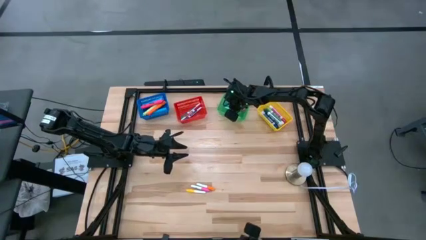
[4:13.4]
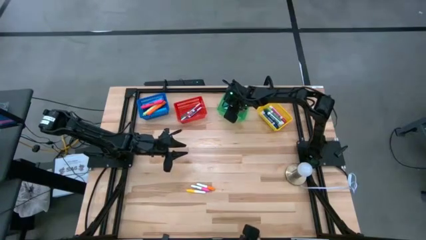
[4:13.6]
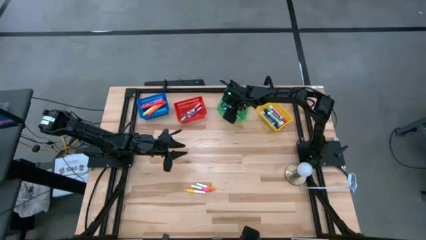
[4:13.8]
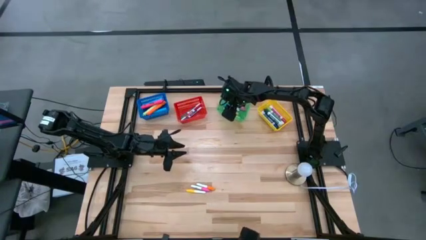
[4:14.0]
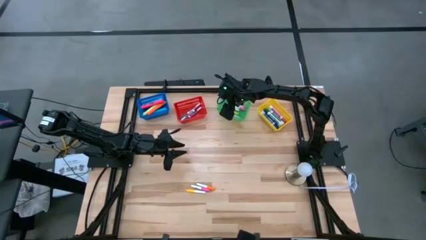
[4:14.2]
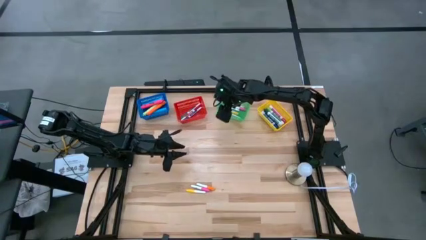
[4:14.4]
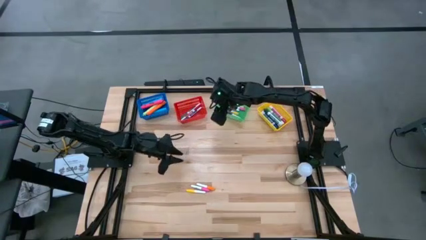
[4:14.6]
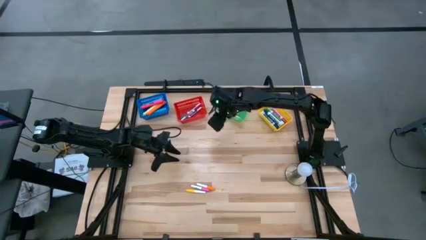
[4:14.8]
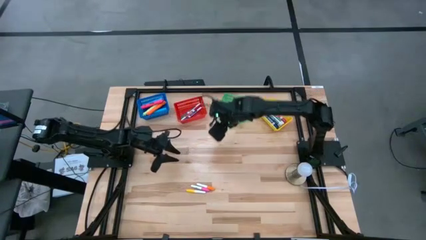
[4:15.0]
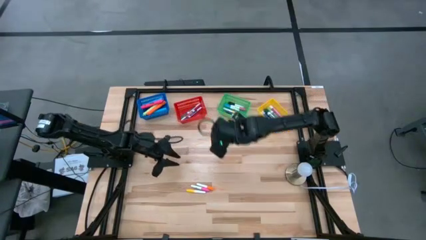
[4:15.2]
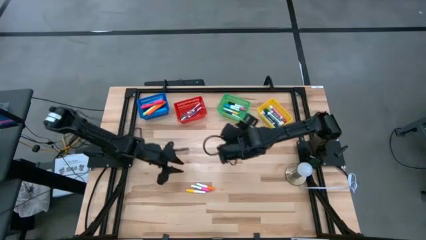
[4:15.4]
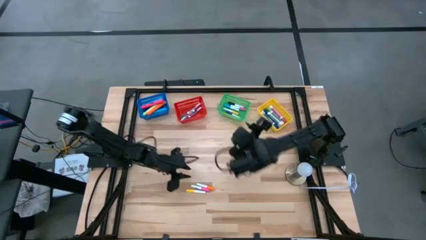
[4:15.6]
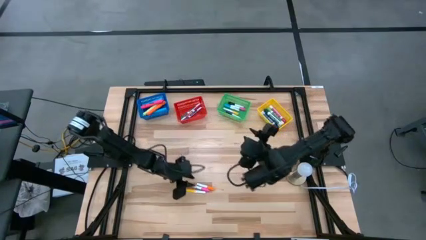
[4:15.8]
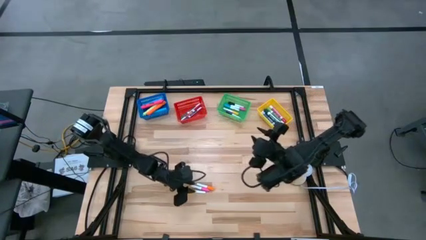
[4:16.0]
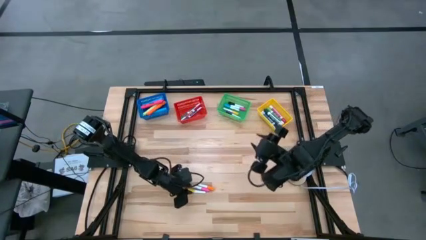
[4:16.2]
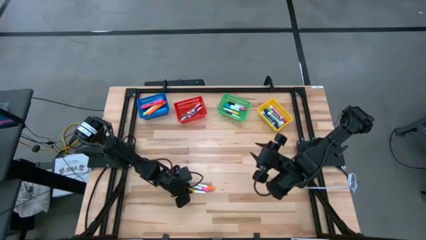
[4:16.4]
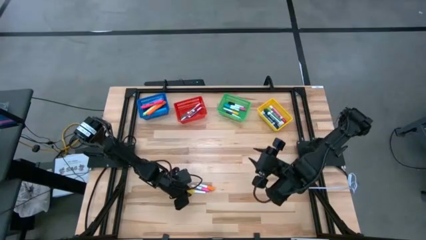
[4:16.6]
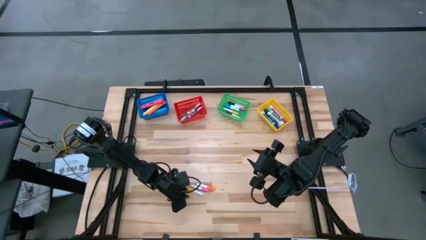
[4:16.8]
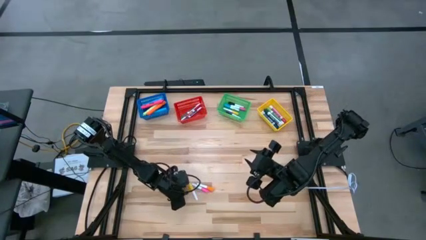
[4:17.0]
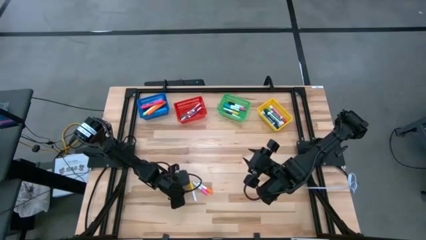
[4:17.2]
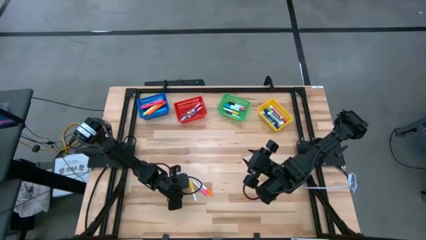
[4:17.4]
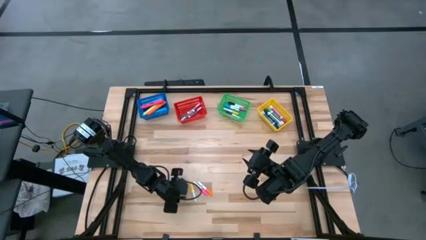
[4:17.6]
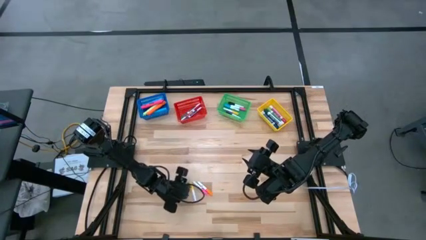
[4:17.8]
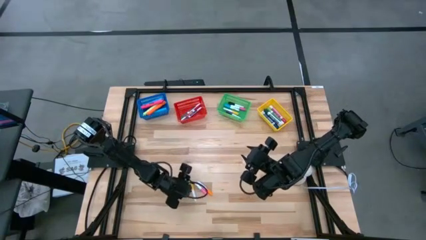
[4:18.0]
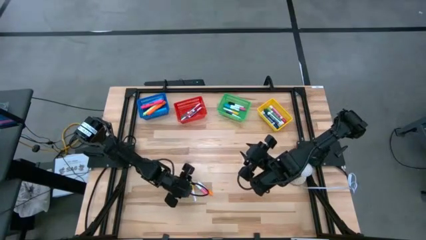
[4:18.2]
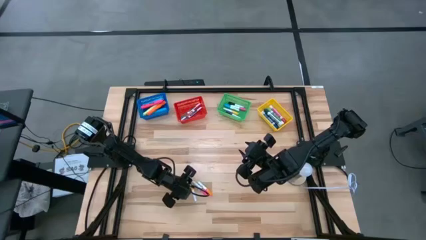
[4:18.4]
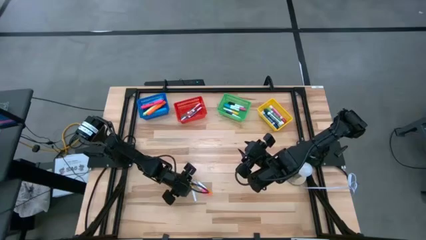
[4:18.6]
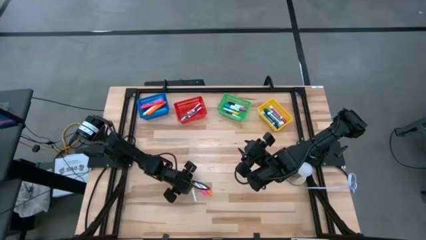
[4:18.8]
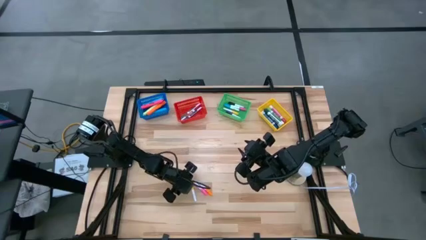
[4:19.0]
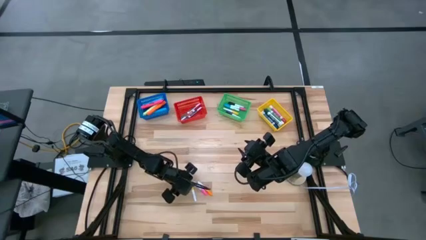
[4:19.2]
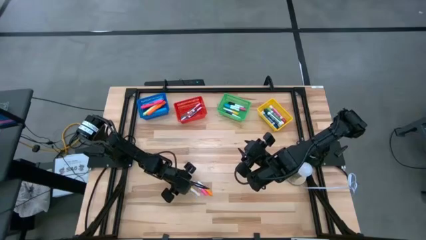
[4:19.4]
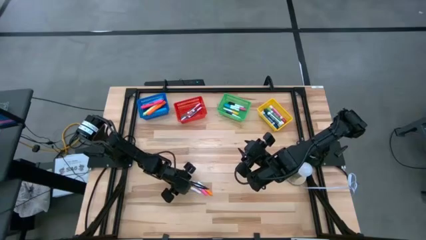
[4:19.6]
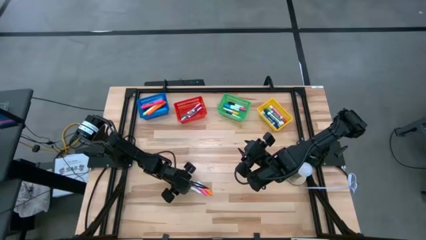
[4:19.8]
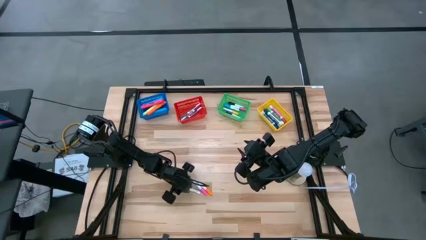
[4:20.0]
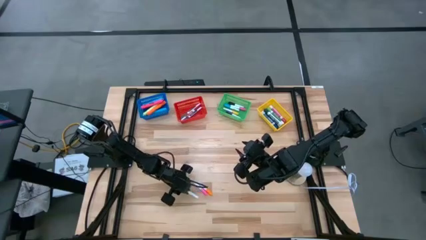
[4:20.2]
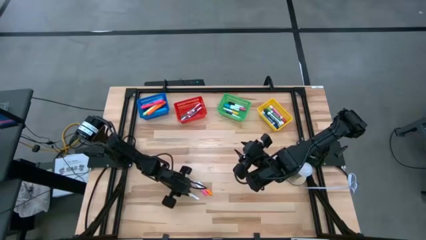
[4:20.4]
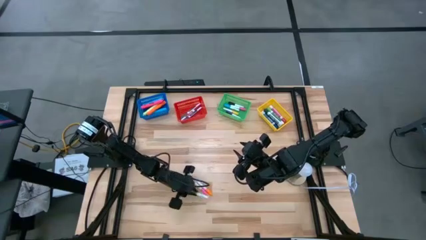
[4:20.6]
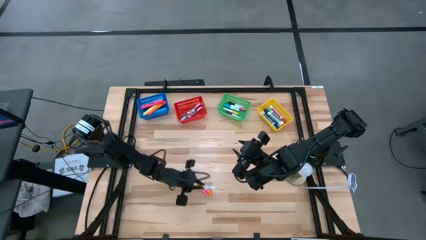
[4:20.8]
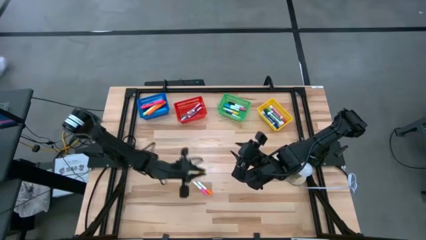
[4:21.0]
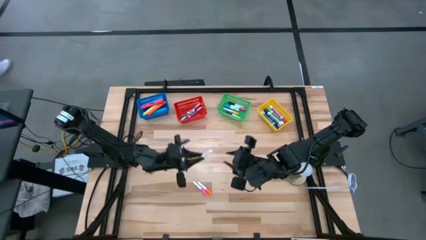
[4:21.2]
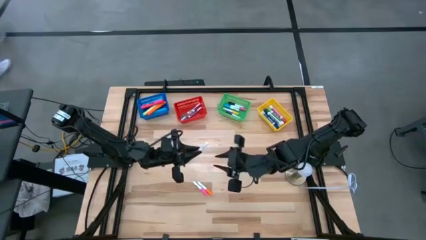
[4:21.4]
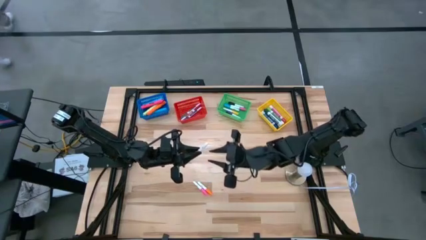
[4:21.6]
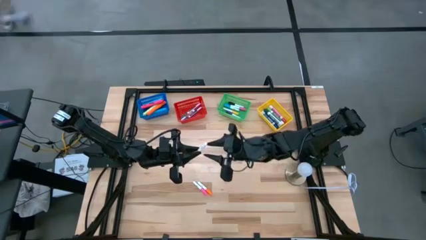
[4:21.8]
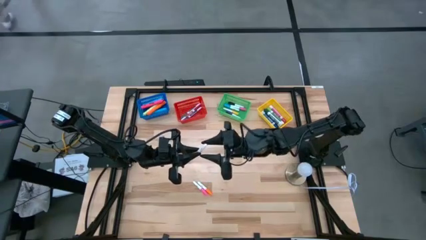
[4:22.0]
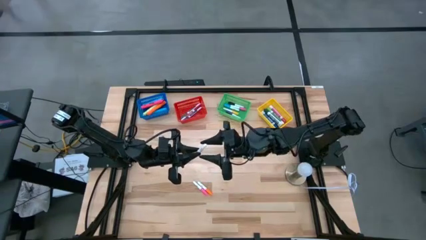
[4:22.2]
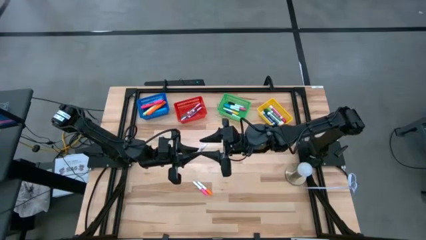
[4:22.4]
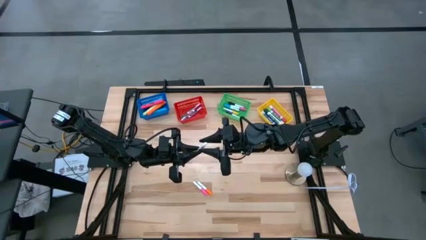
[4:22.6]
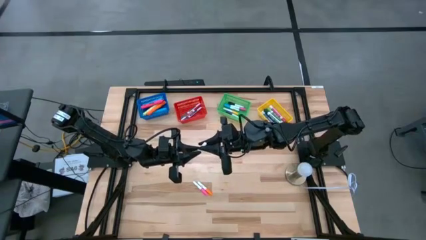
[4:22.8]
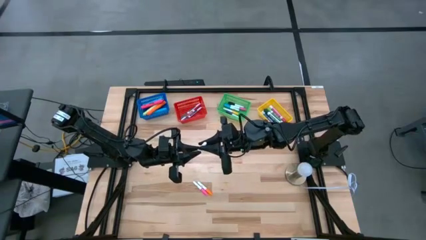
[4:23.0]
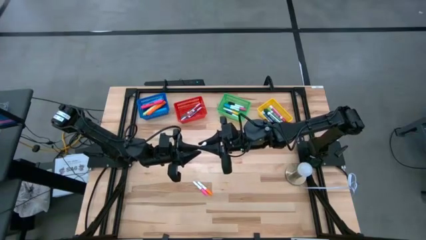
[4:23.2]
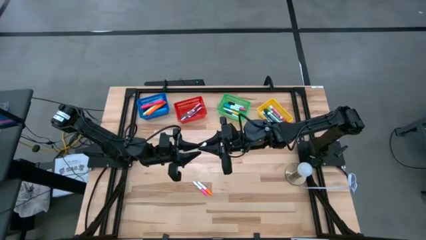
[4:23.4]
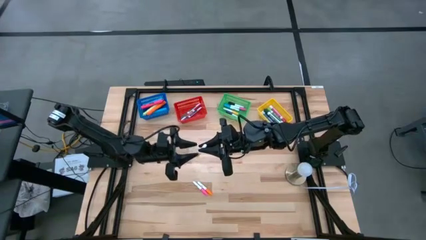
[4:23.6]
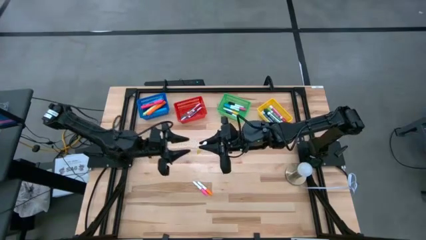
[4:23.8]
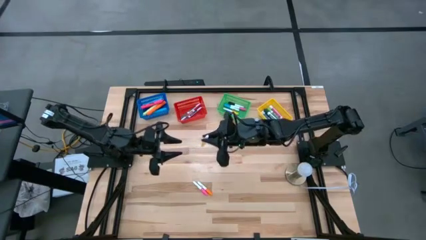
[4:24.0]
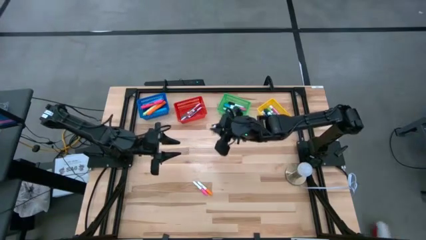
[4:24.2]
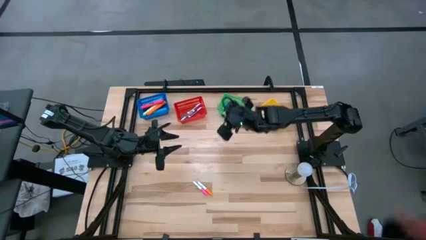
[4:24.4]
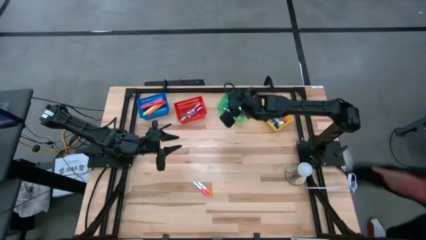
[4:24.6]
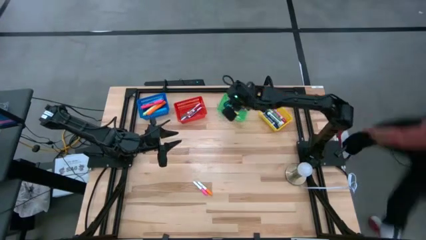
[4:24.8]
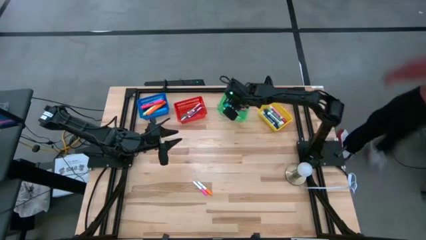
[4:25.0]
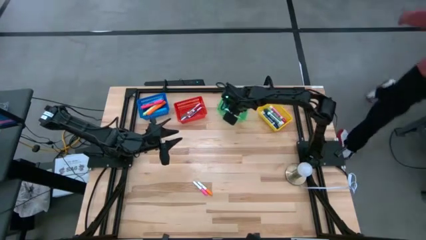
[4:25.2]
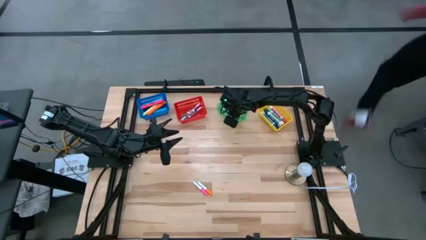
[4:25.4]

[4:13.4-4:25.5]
Task: Pick & Place Markers
Put the small yellow highlighter pen into the green bin

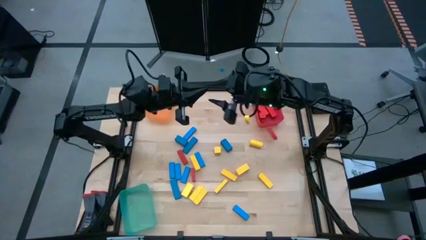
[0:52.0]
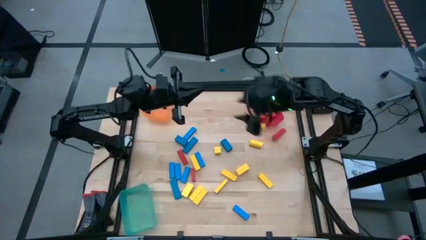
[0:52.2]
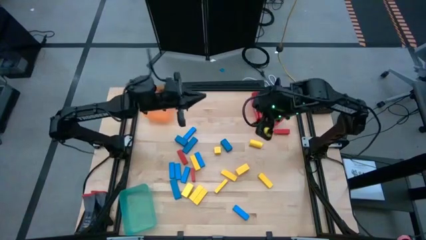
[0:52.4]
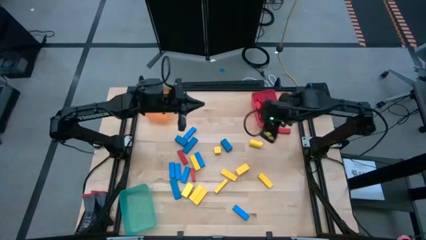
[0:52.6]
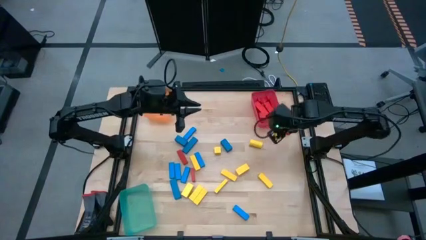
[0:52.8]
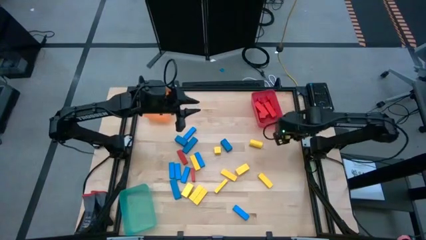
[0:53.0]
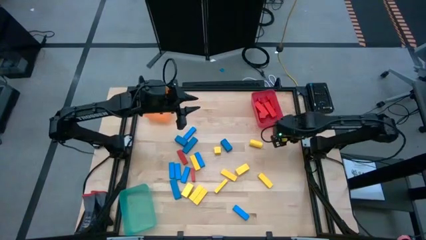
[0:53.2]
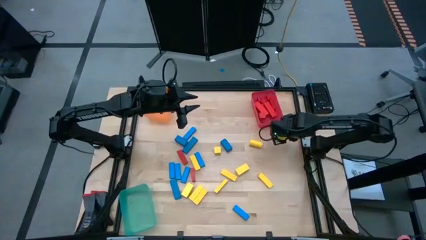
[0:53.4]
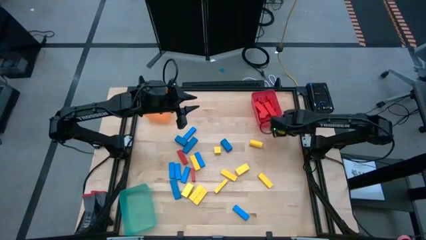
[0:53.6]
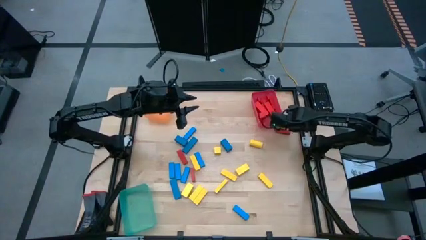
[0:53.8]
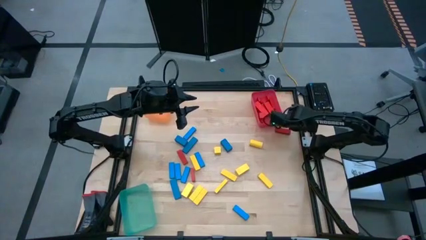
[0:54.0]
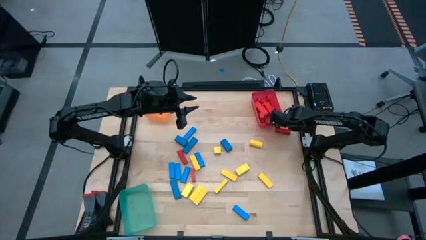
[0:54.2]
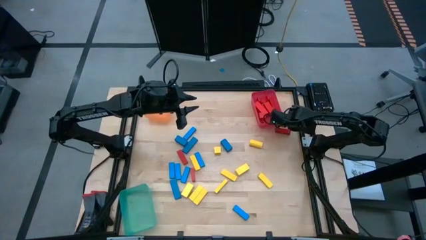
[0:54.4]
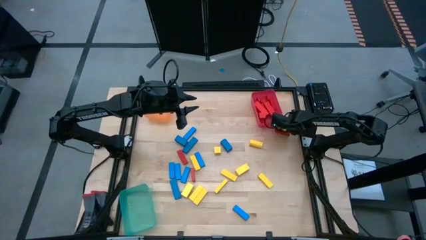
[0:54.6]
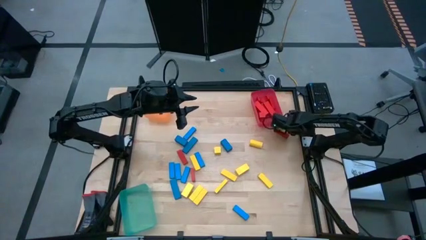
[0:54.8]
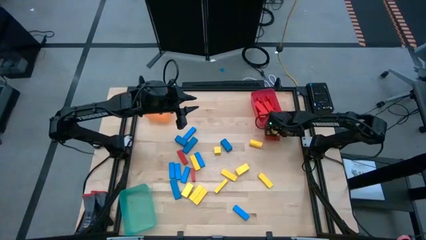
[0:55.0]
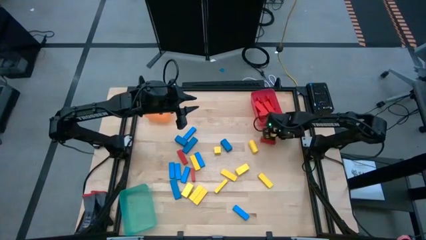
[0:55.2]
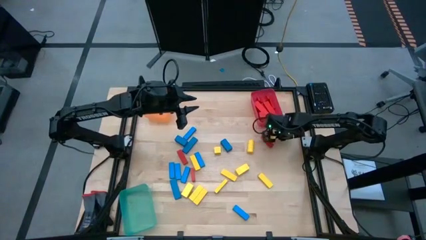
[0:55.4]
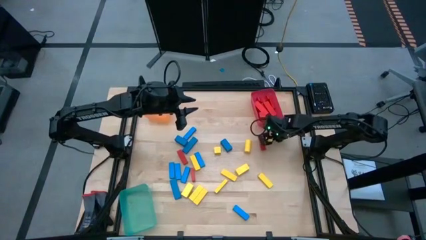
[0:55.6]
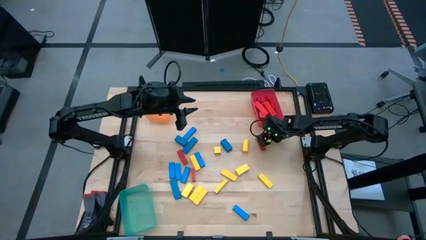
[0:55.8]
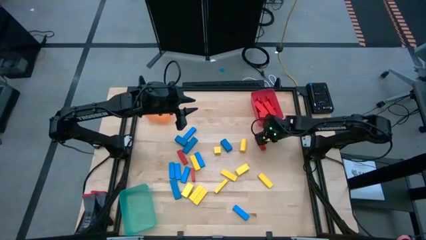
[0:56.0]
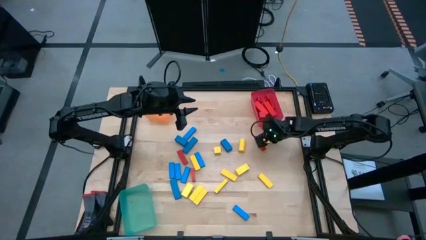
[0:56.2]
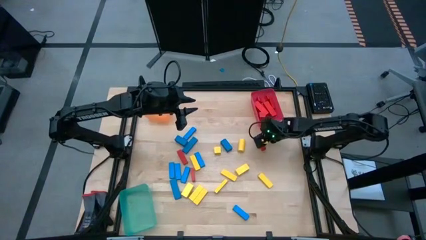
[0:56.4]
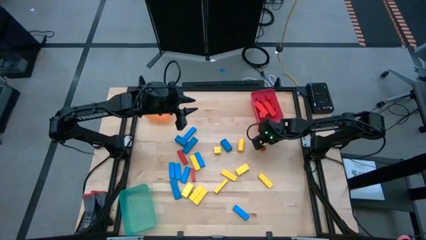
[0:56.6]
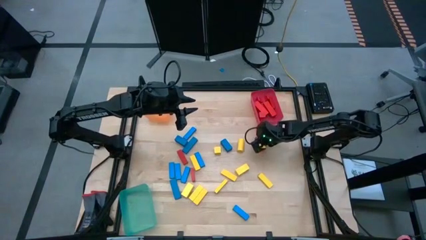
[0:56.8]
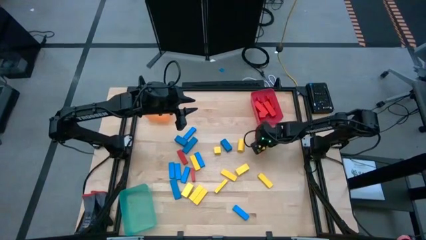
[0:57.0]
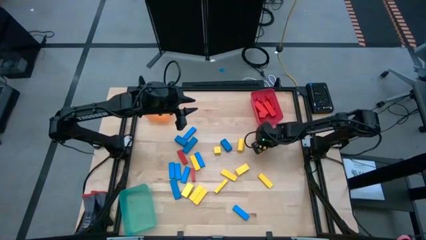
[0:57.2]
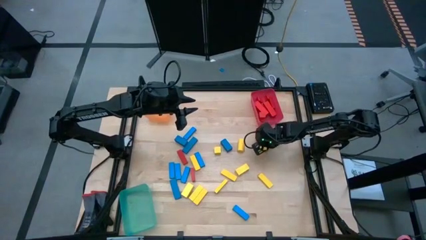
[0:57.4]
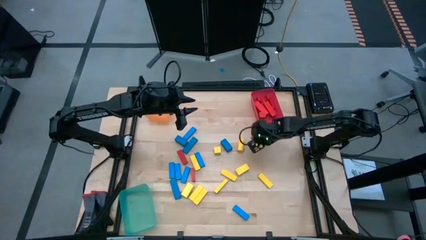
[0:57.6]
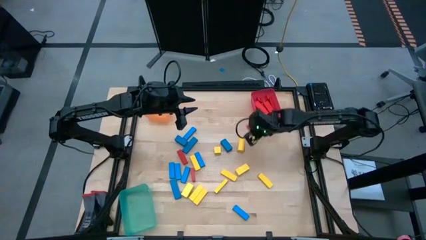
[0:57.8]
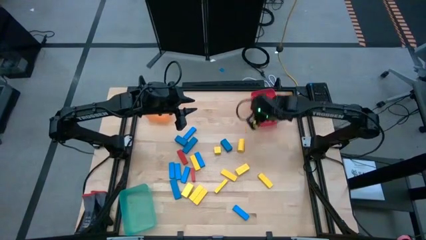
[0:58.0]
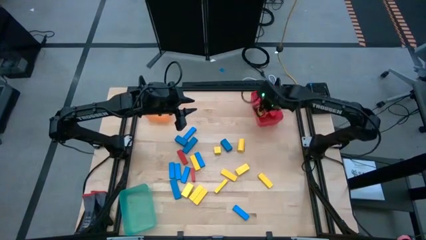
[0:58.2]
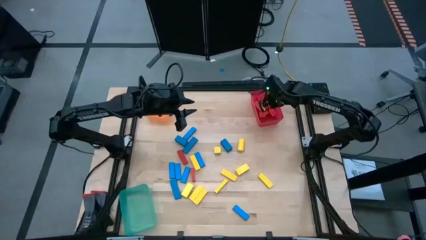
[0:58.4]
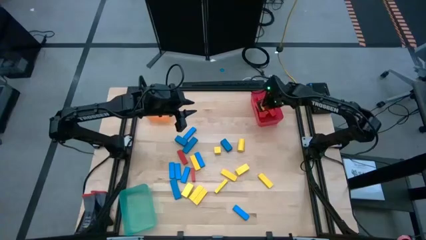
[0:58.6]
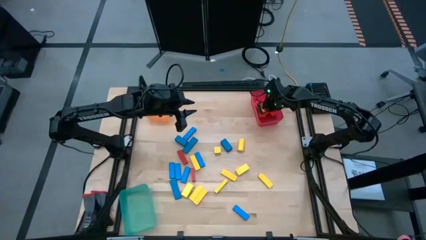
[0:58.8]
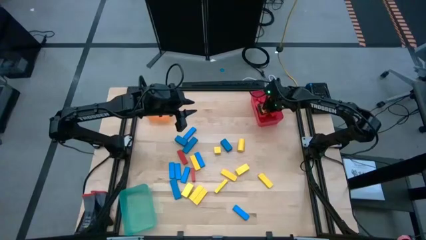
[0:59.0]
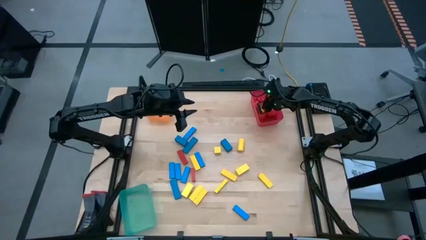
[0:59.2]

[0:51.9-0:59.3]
Task: Sort blocks
Put the right red block into the red transparent bin
